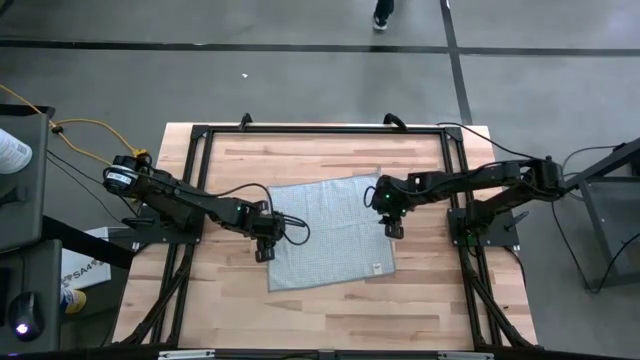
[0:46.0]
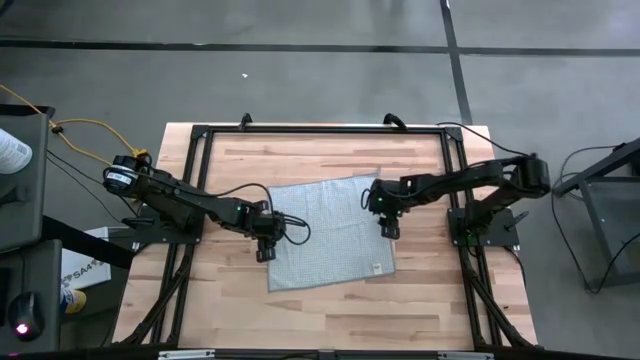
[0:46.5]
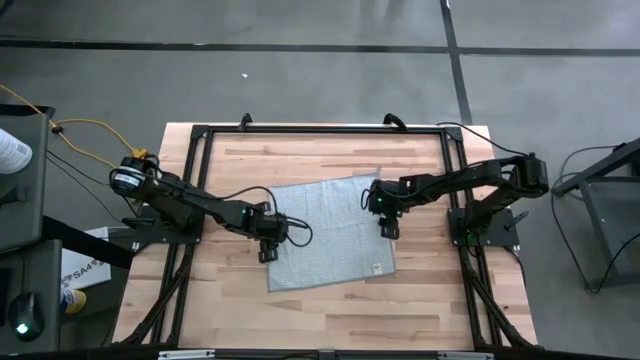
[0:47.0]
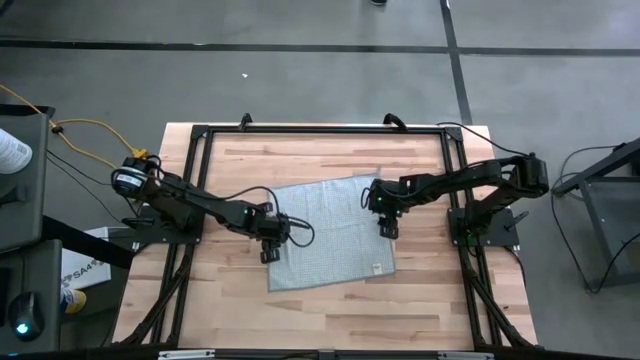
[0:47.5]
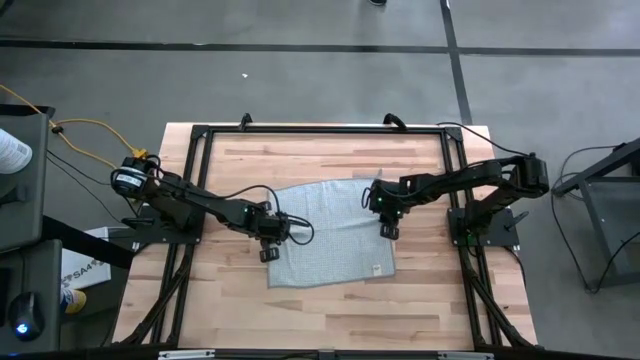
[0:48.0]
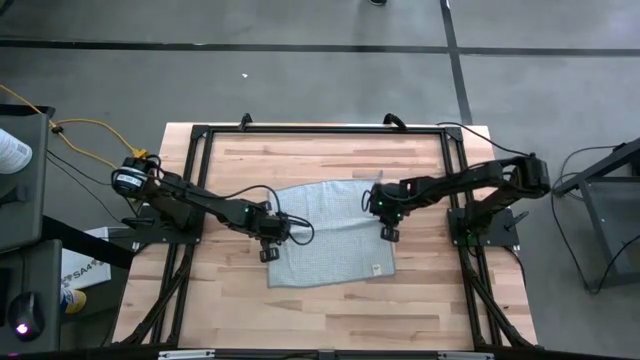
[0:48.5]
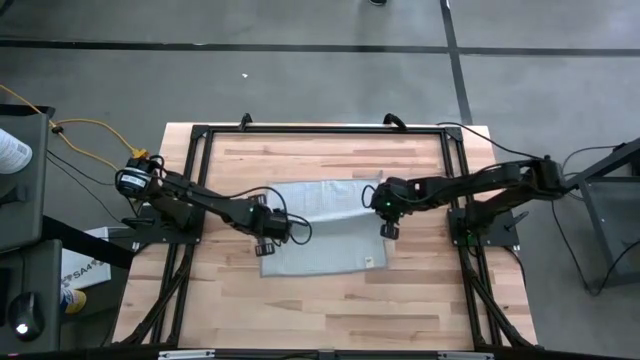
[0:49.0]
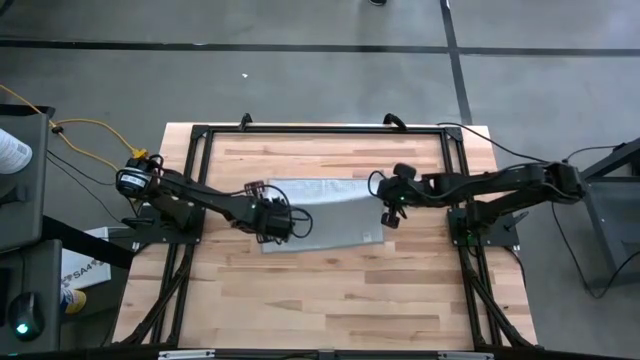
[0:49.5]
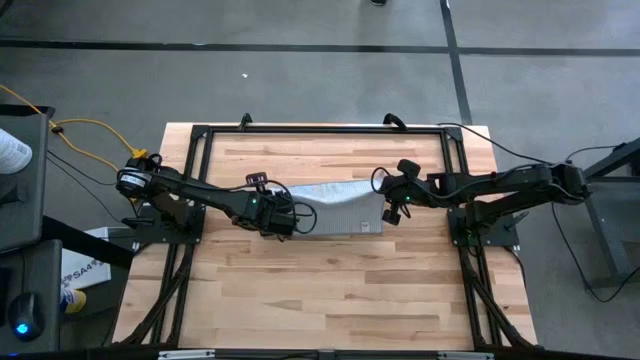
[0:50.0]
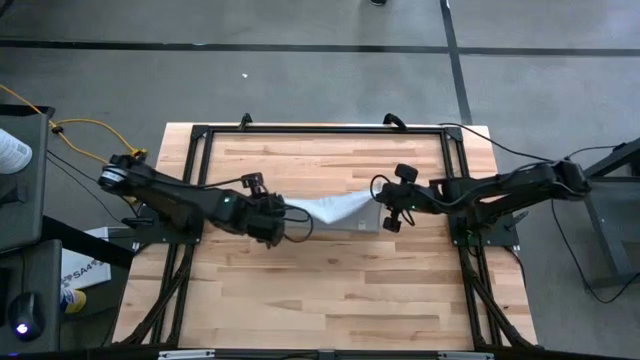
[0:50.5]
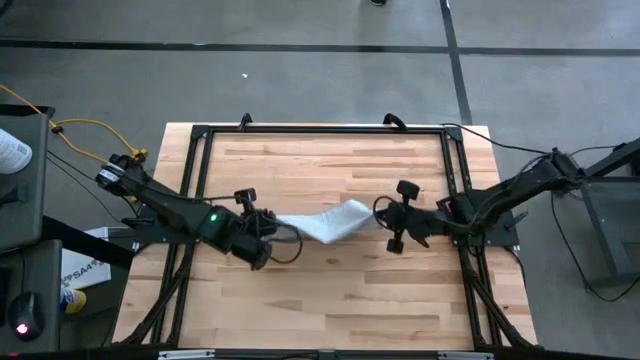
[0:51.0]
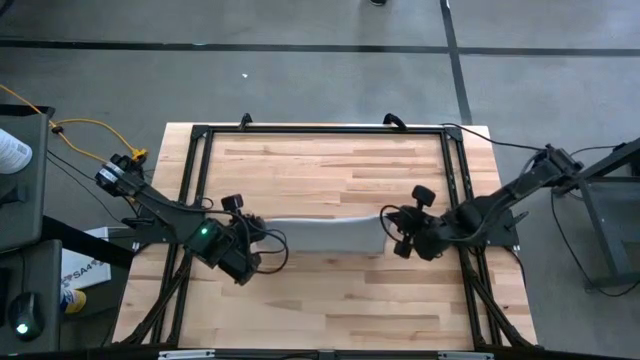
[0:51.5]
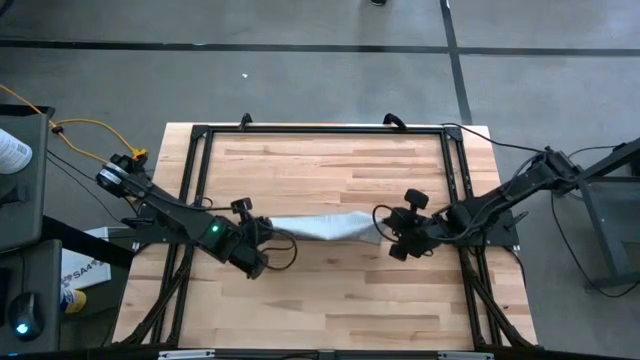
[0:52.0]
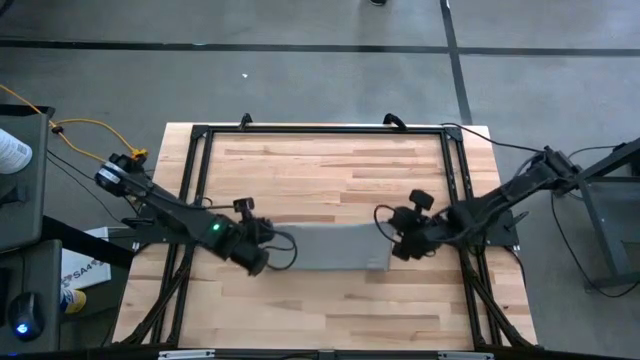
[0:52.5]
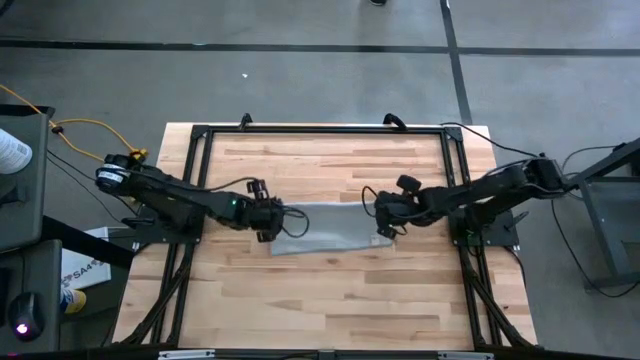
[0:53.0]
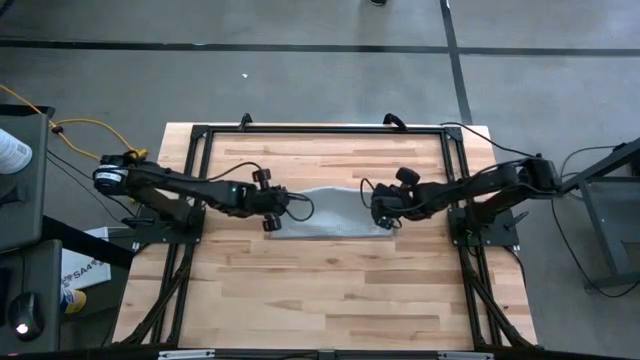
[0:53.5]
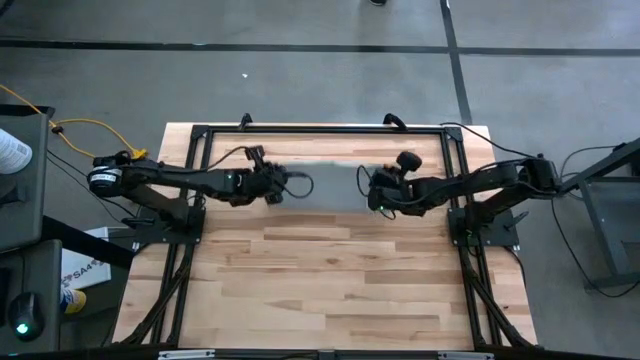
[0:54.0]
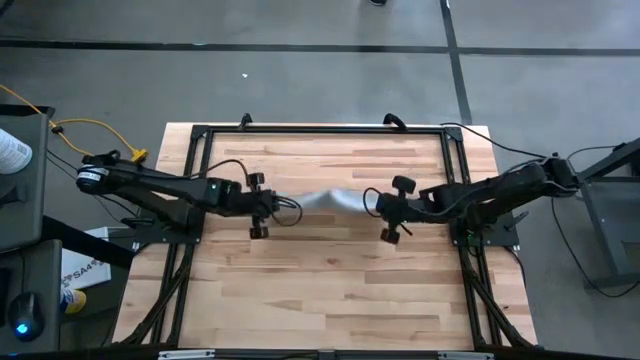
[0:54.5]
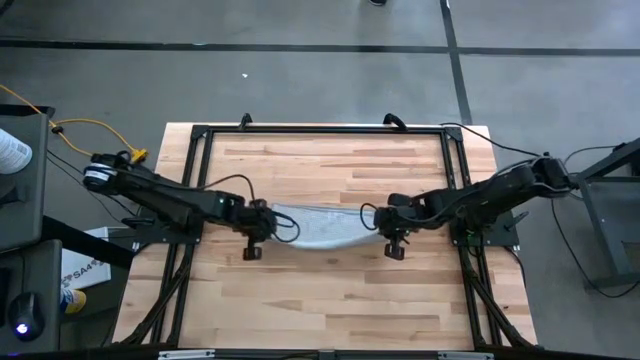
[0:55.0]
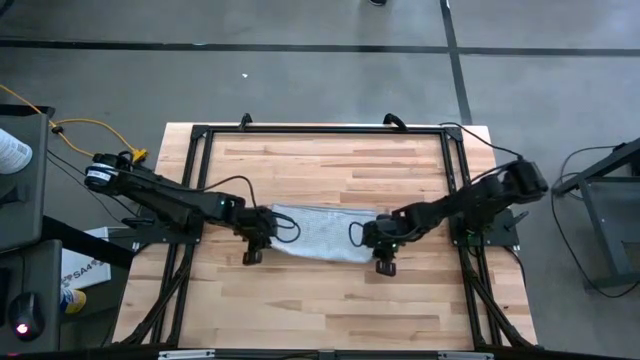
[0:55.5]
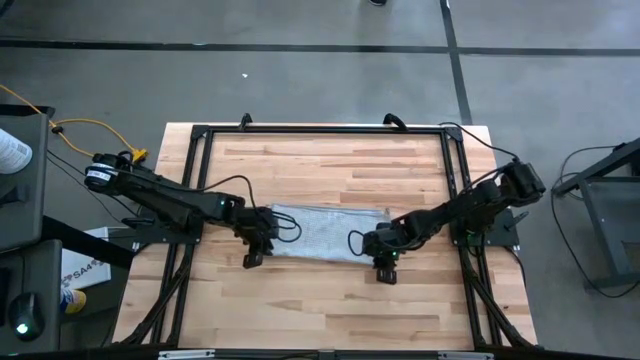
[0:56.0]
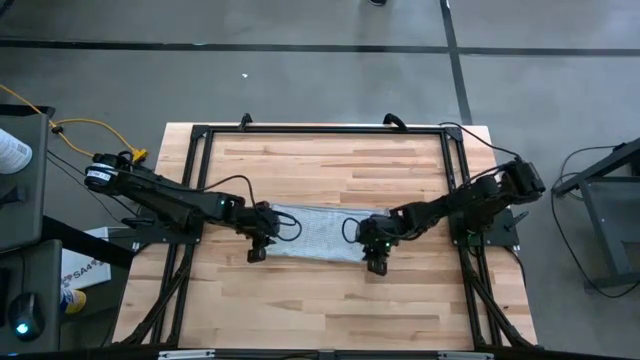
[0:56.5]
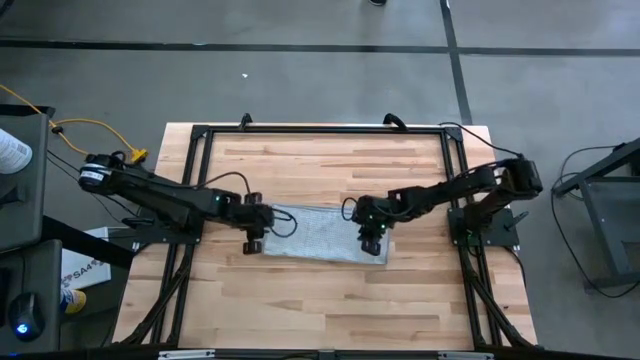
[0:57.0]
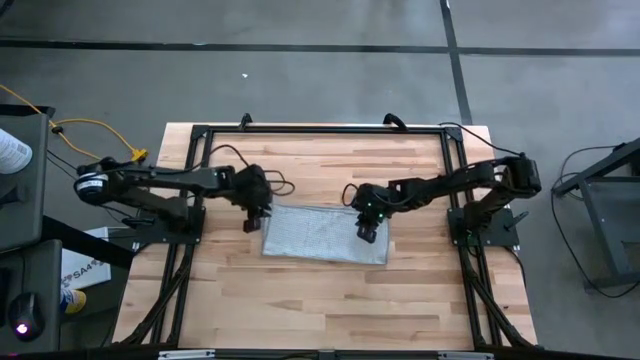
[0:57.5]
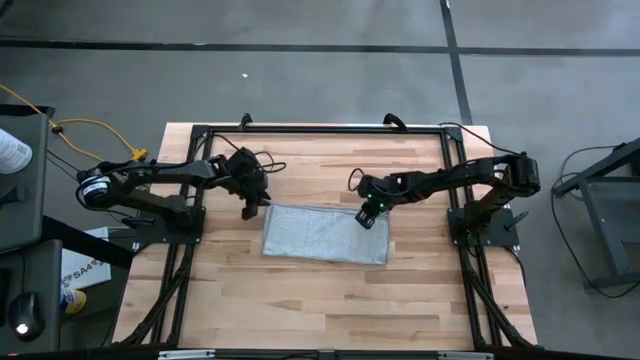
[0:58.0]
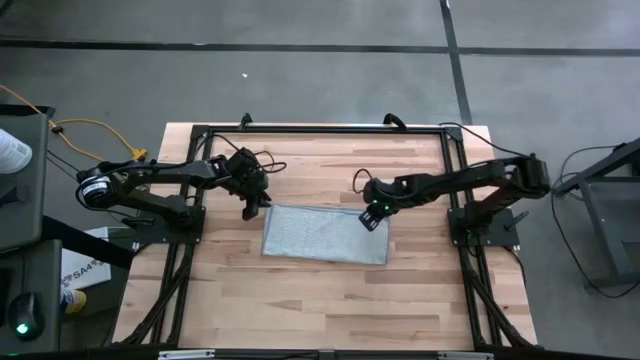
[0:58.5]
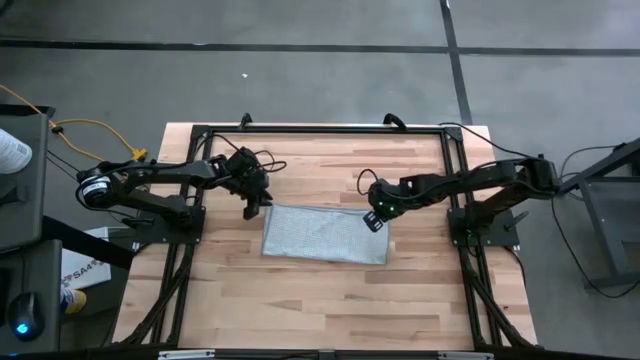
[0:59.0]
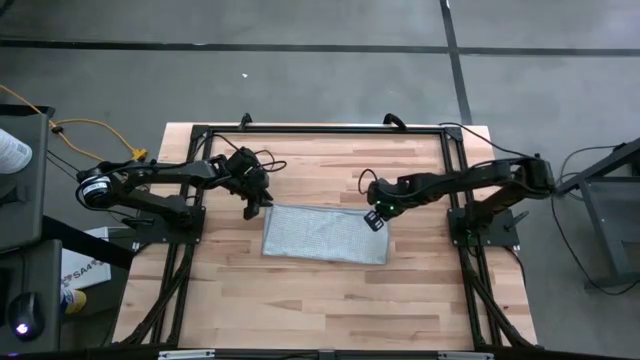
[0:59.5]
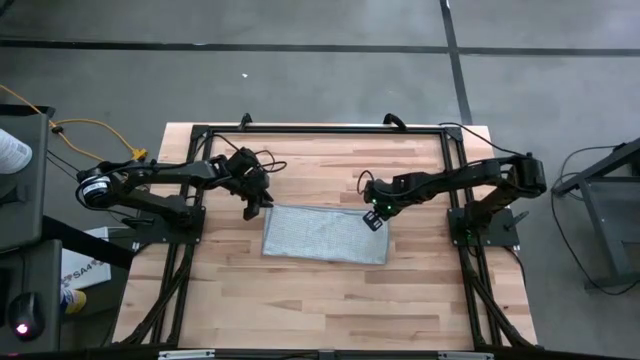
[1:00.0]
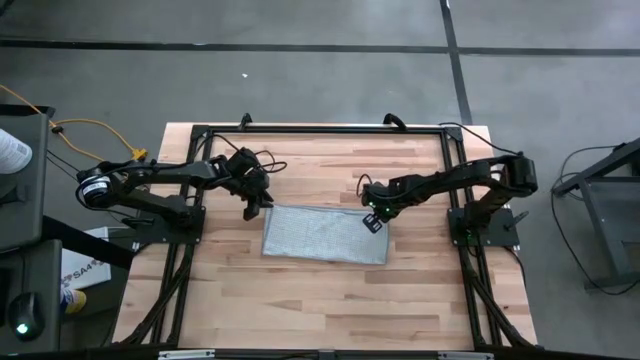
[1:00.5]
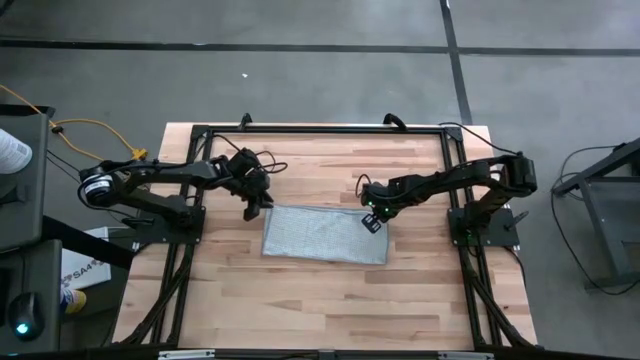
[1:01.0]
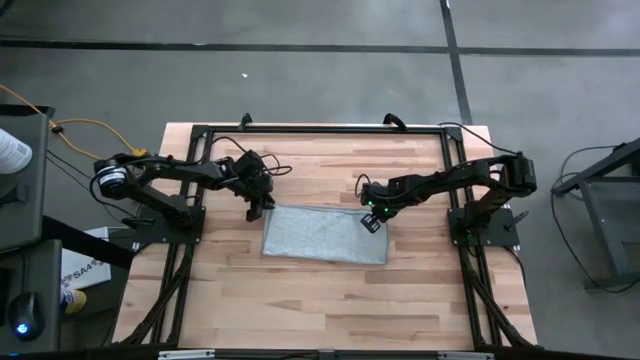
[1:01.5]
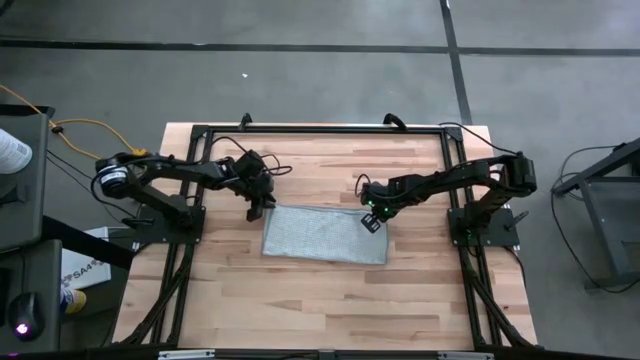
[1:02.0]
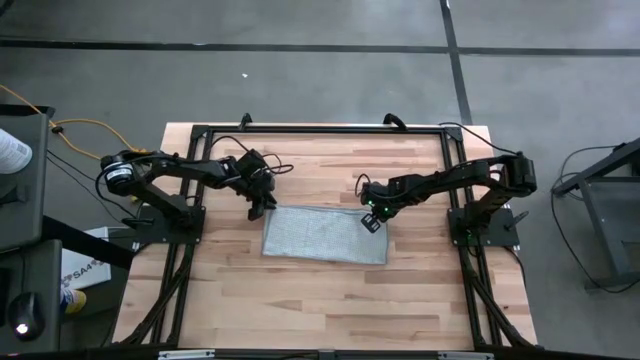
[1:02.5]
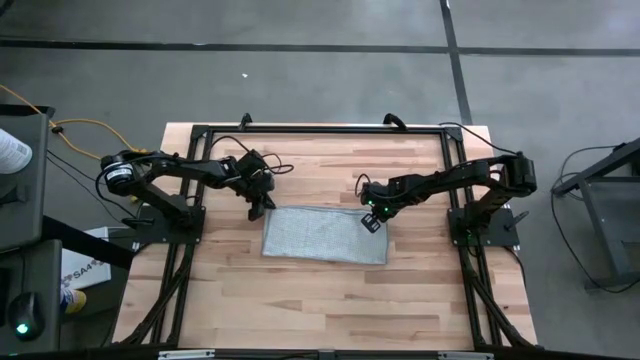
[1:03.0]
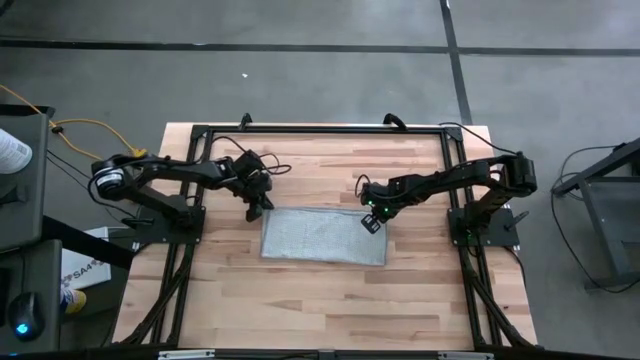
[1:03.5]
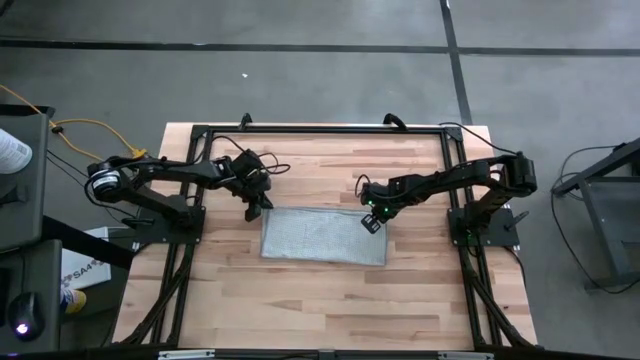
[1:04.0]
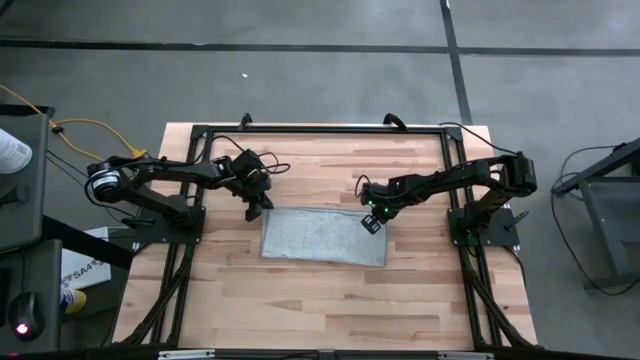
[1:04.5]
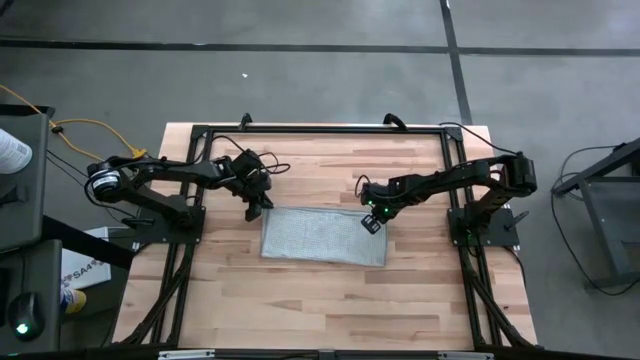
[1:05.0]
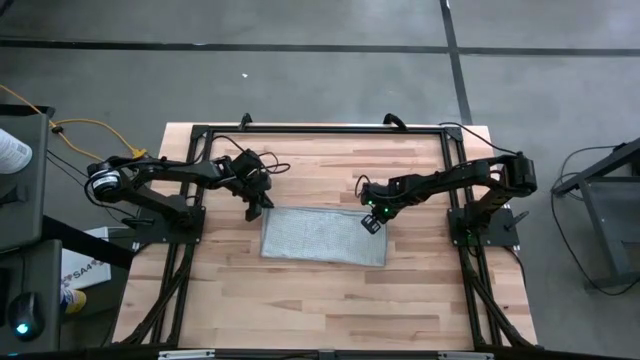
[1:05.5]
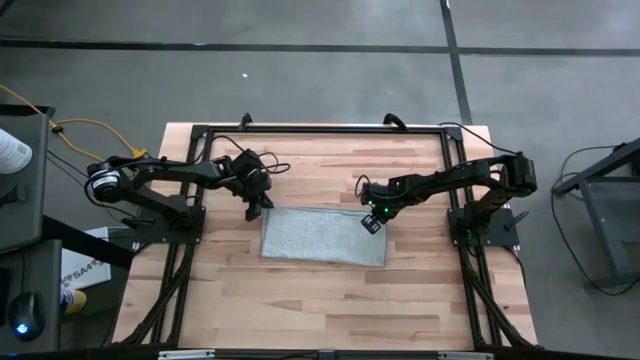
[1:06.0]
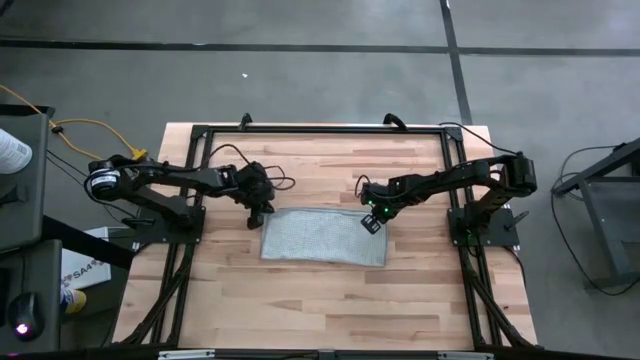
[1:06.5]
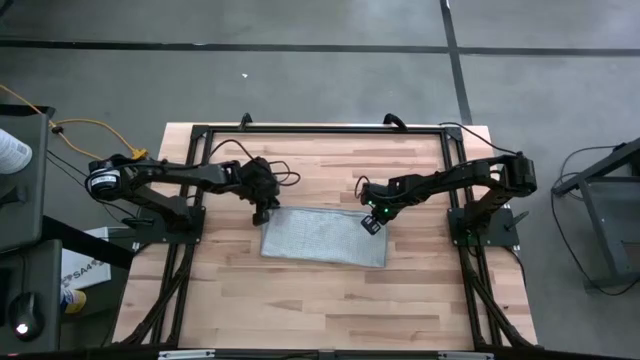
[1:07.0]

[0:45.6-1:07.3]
Task: Fold microfiber towels
Fold the gray towel
